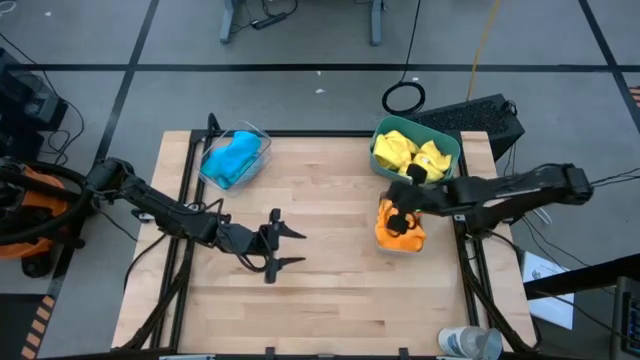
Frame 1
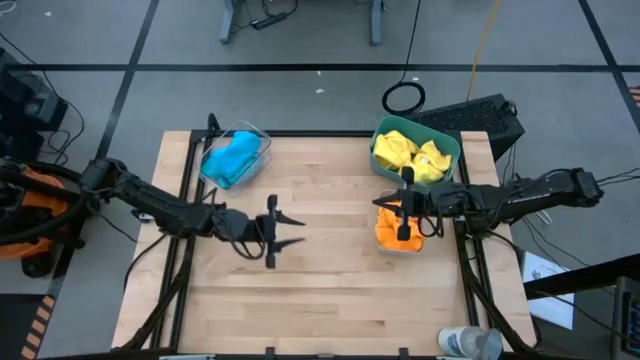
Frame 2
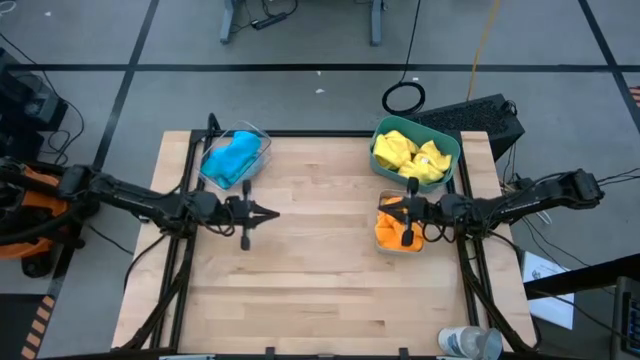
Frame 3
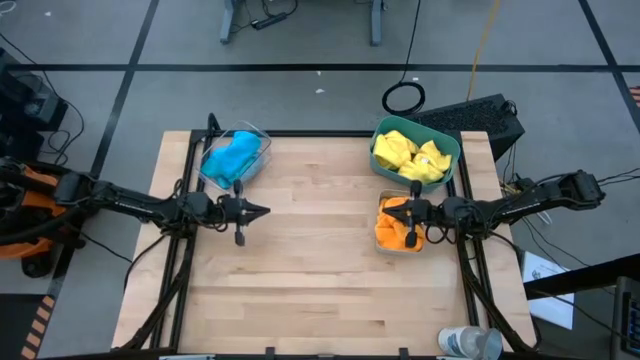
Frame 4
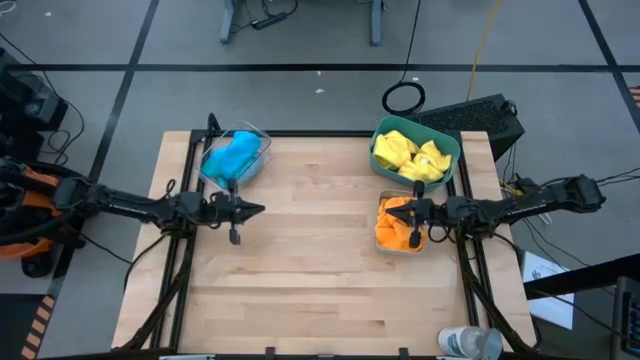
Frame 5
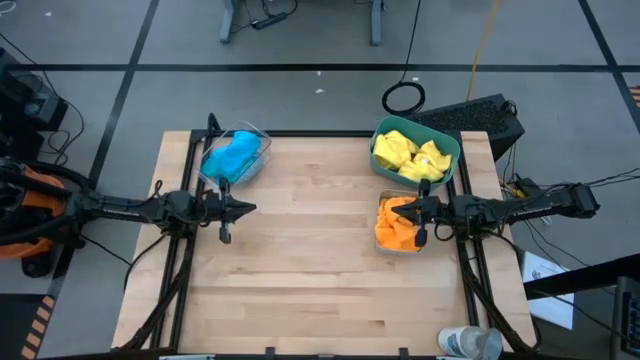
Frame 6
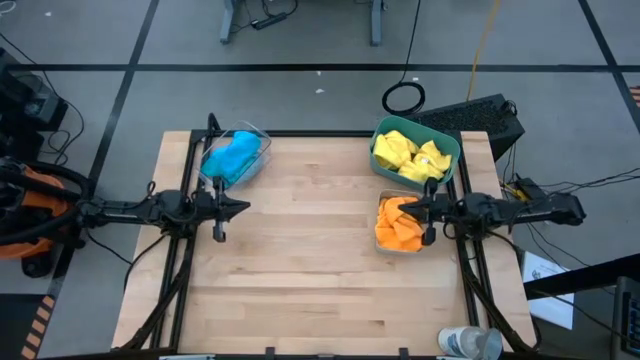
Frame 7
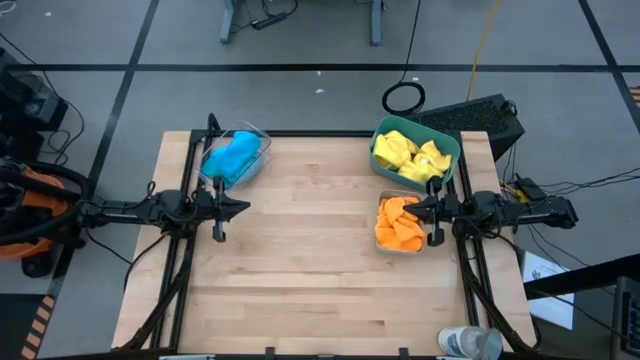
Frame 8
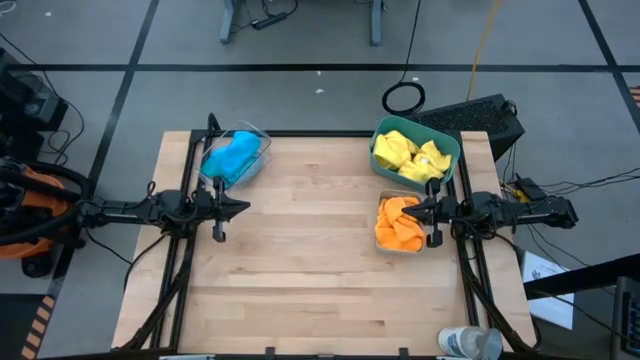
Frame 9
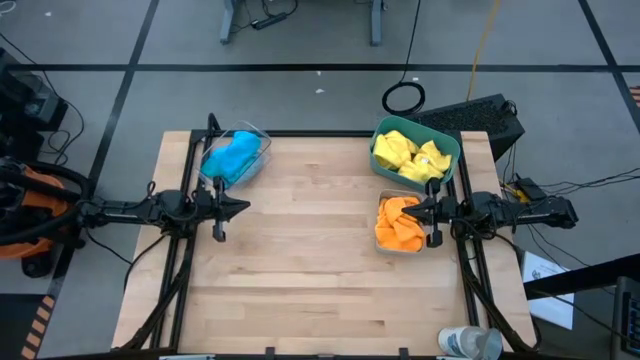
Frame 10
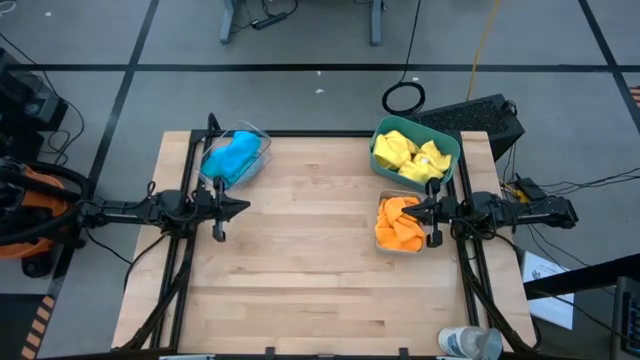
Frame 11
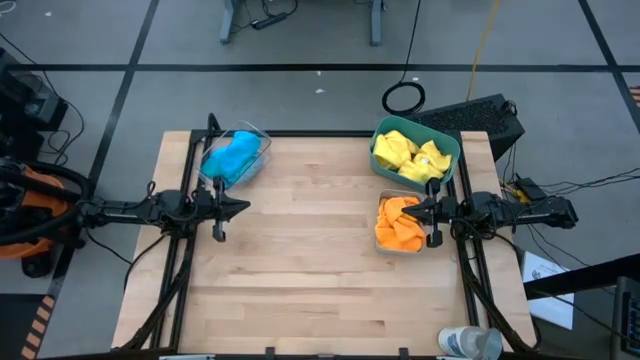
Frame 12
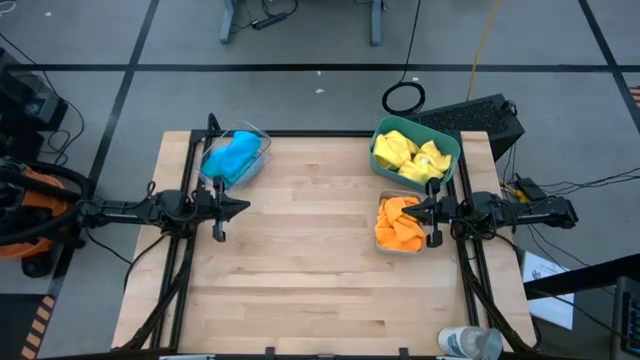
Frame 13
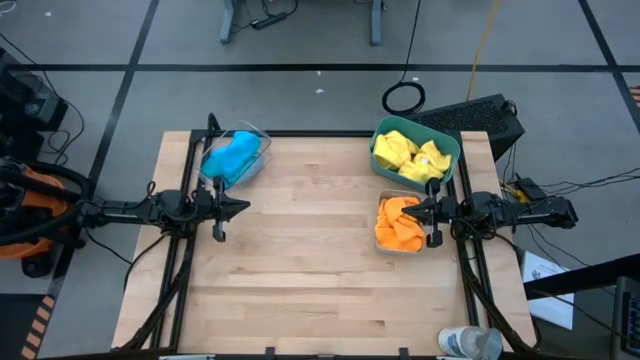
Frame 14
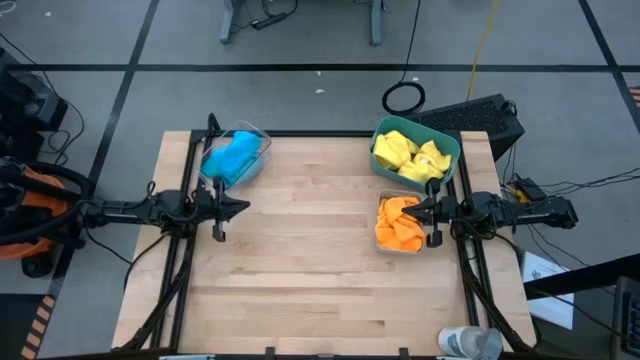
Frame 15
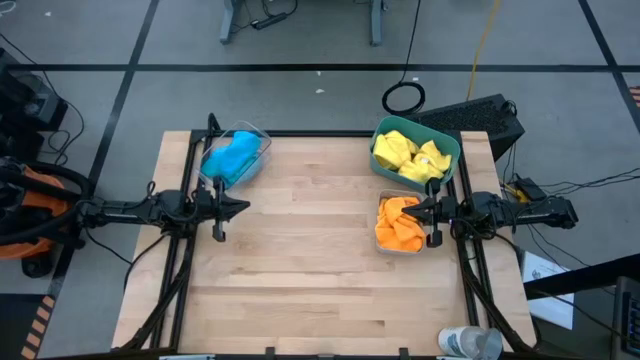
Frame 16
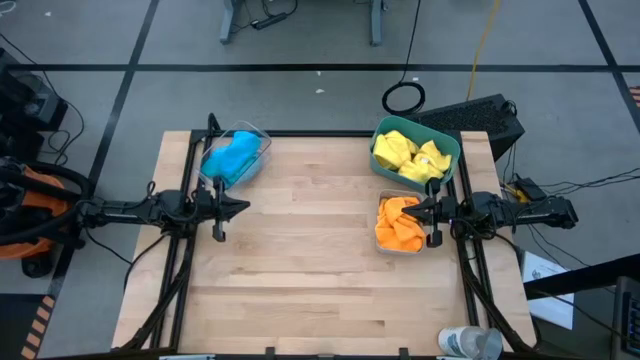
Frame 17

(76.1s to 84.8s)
Task: Sort microfiber towel by color & place in baskets
Return to Home Position

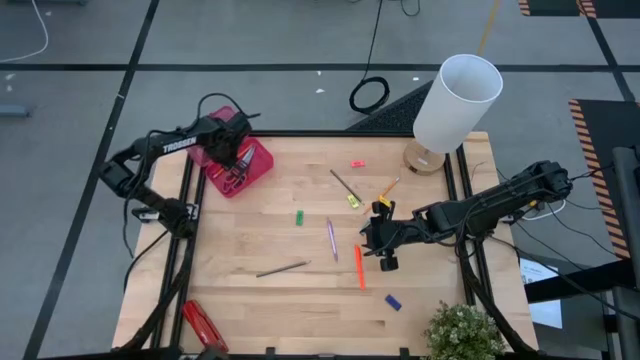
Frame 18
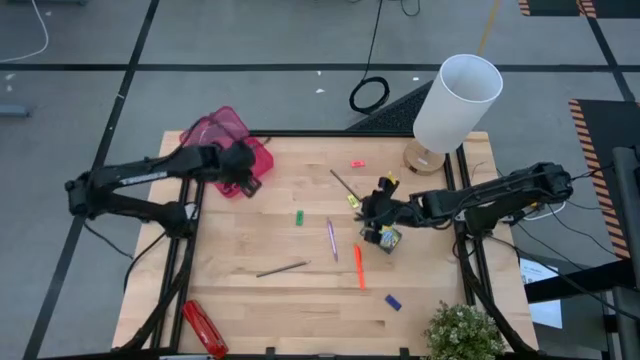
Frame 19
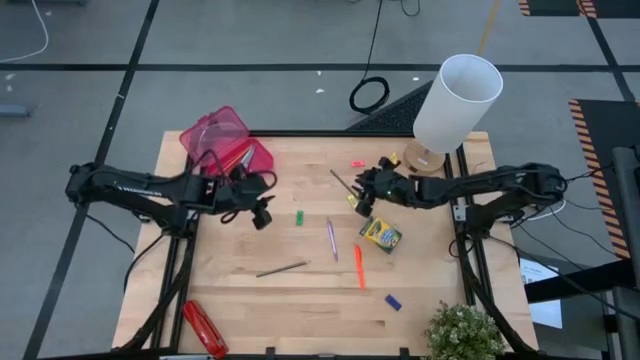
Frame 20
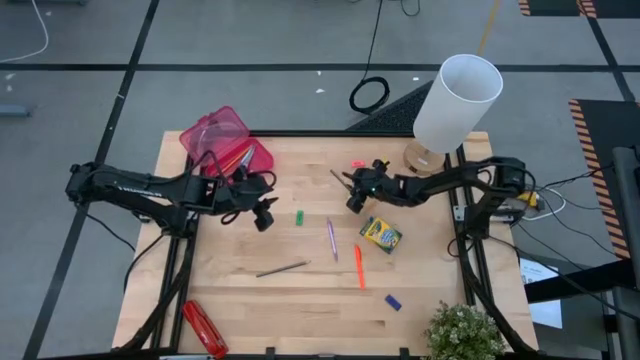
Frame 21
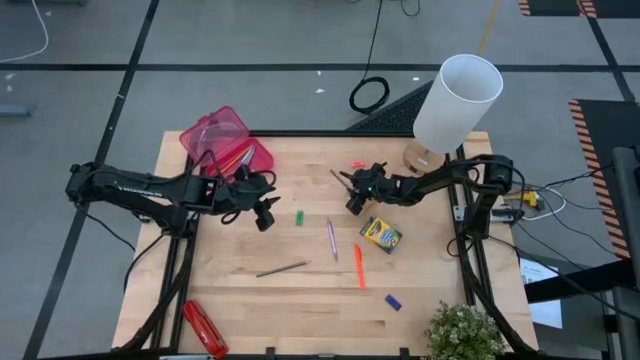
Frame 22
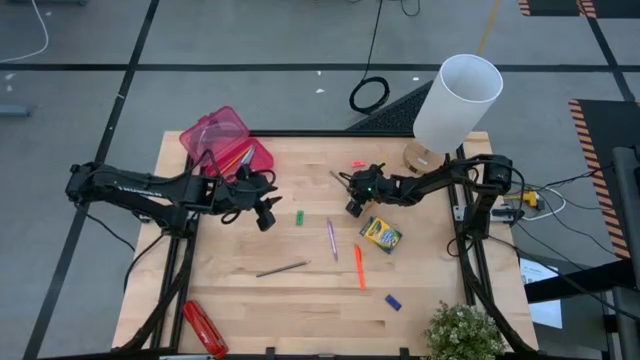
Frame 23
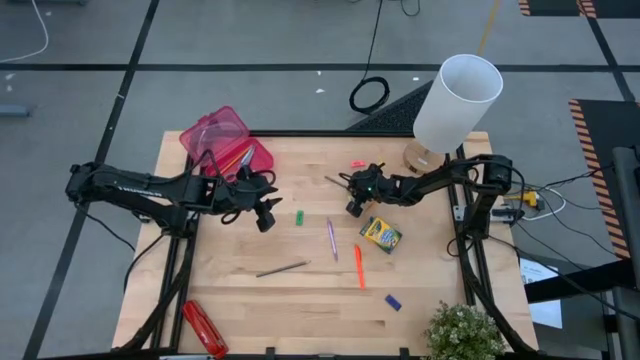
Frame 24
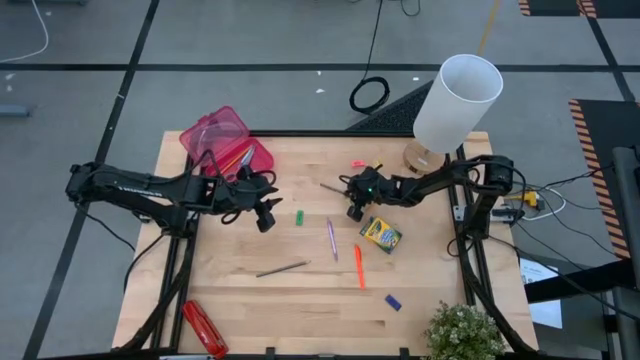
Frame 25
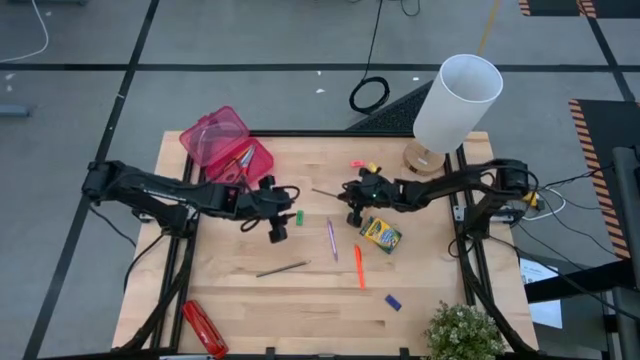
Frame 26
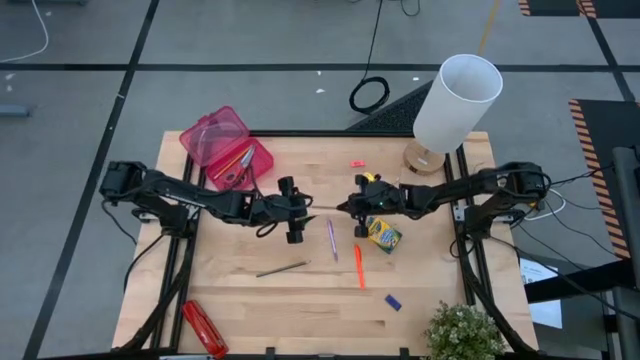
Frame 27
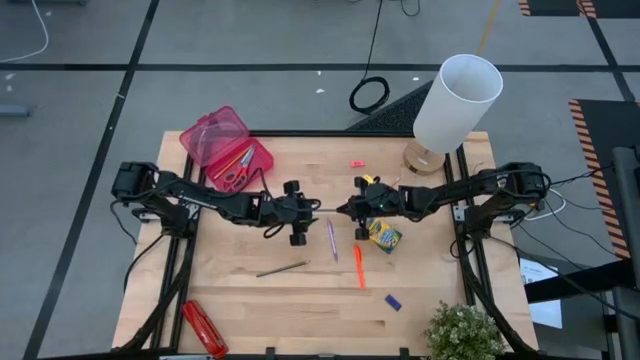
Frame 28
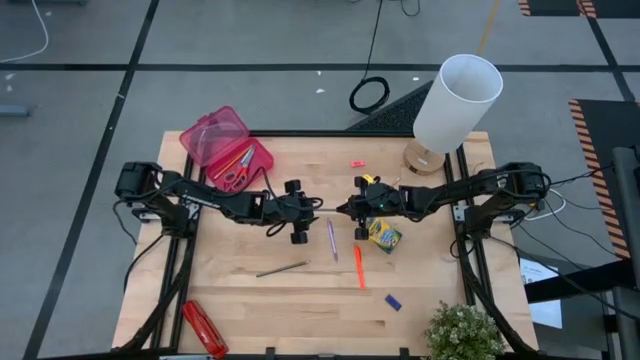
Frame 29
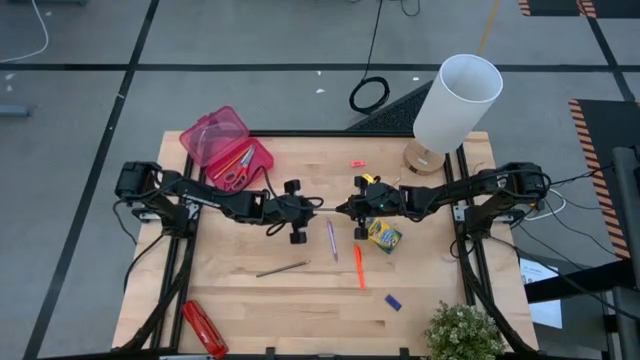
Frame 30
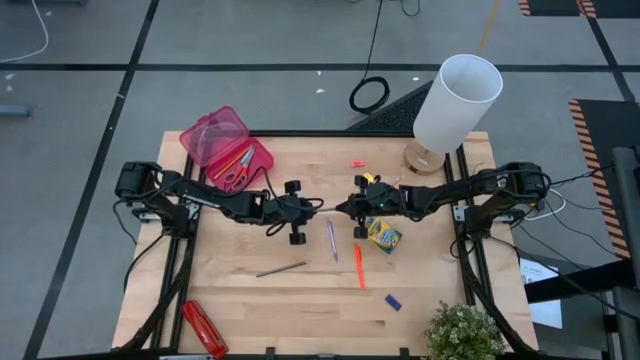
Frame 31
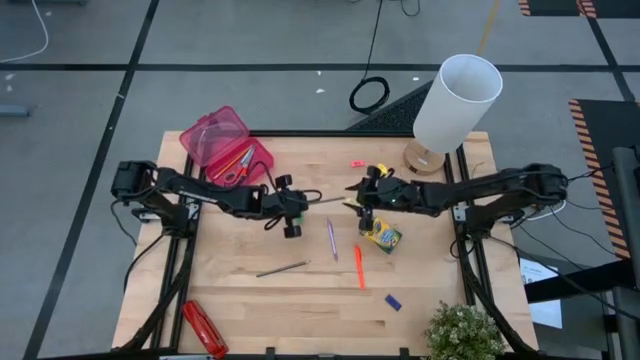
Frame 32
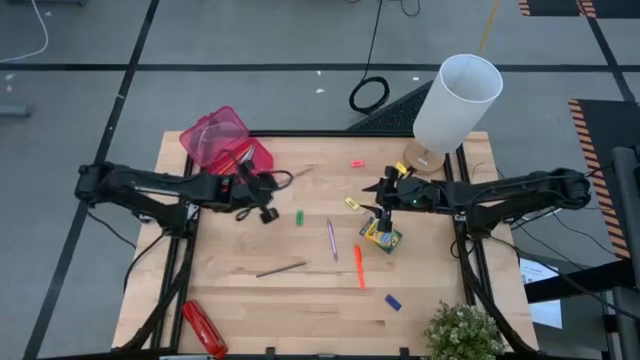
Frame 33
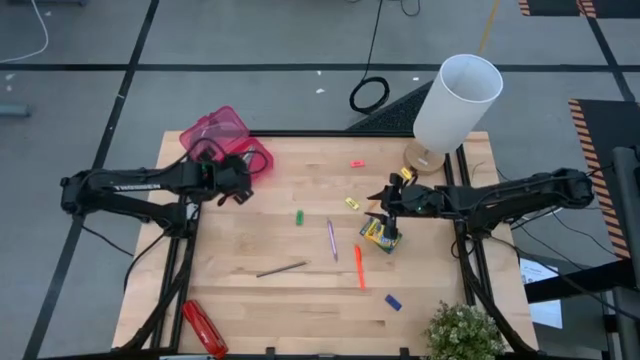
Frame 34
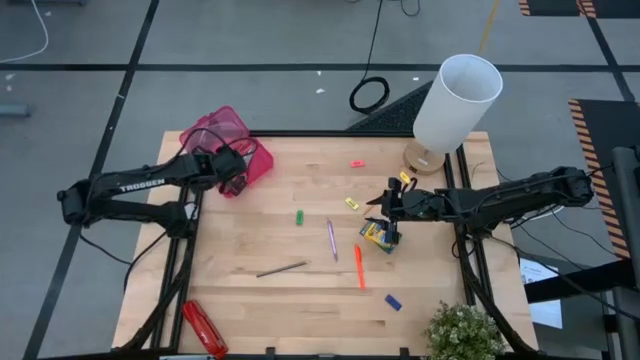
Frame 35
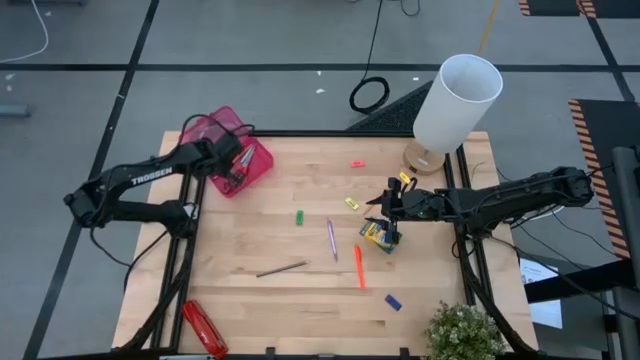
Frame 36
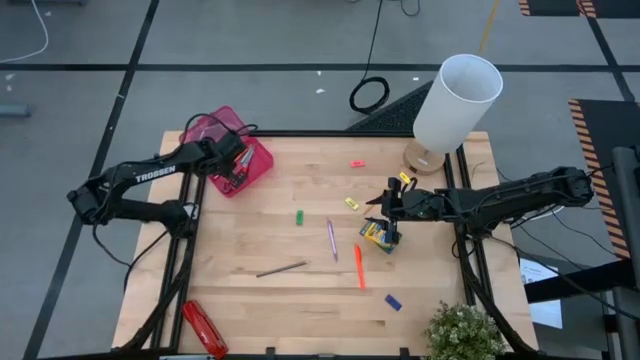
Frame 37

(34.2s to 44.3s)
Task: Pack school essentials
Put the top black pencil into the pink supply box

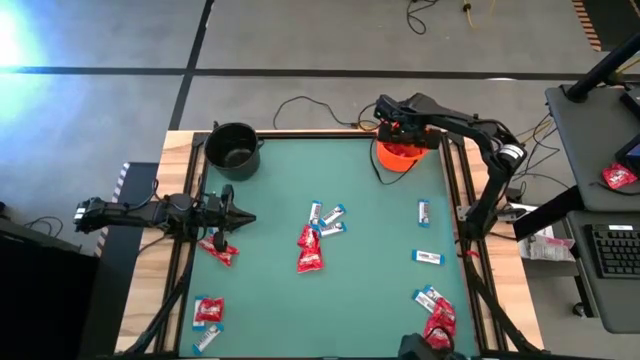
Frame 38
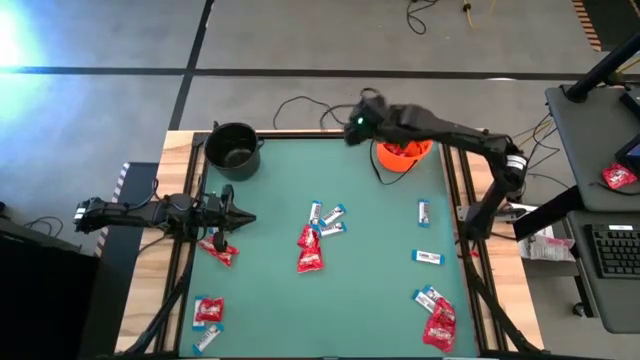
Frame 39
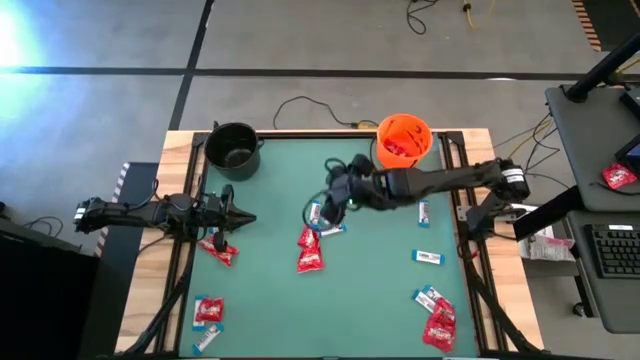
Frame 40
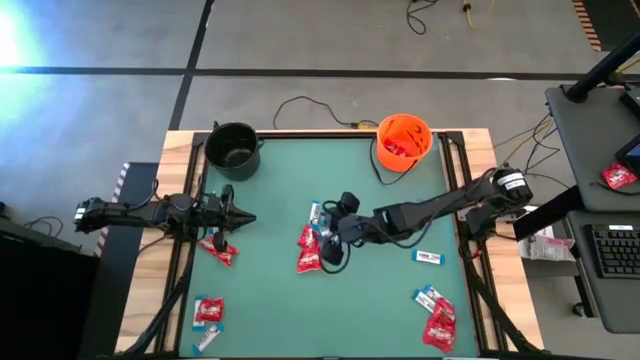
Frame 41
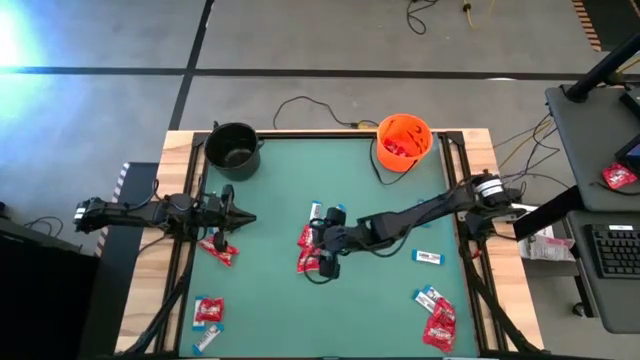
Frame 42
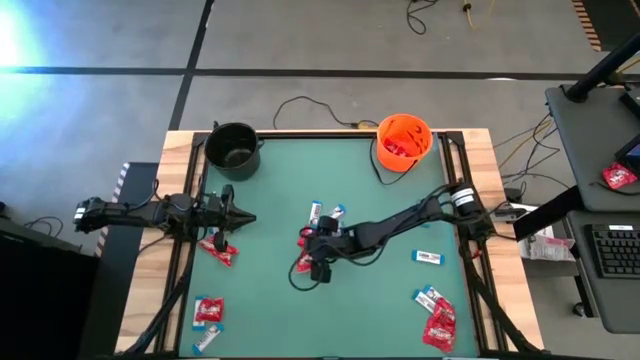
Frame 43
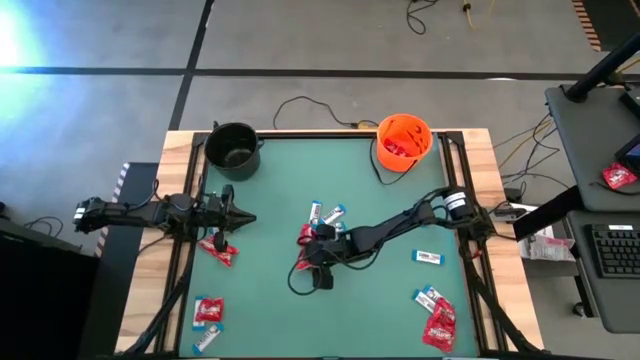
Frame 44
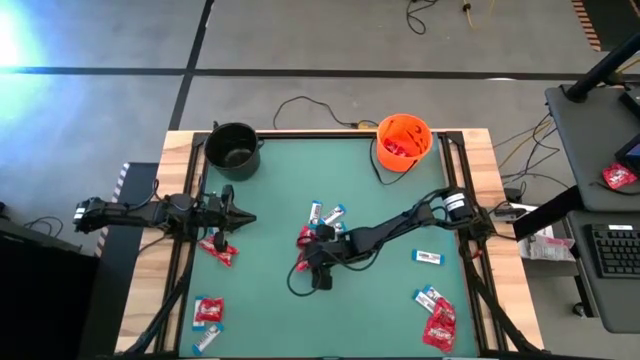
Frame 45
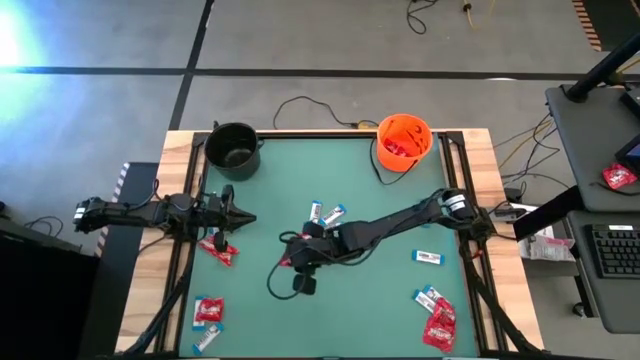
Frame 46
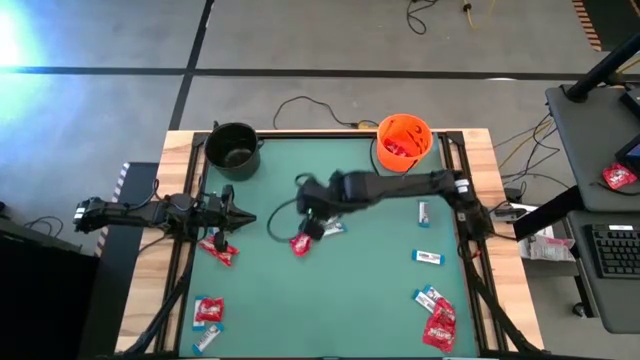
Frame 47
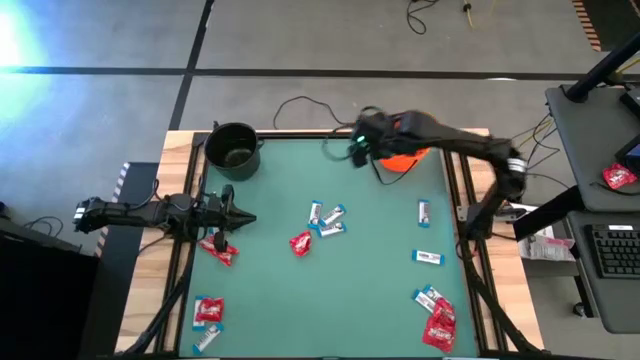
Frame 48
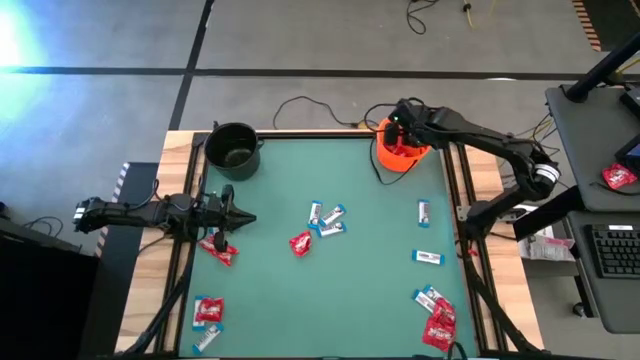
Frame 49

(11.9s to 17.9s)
Task: Sort candy by brand, put in halloween buckets
Put the red candy into the orange bucket
